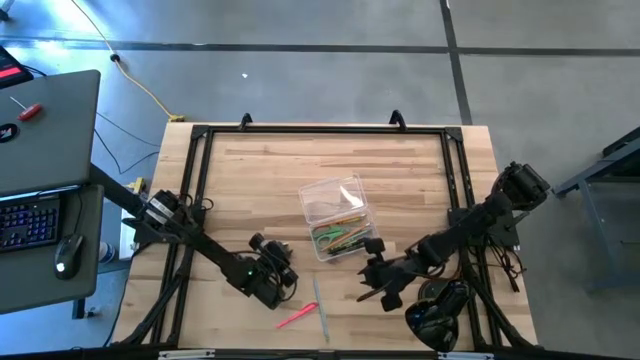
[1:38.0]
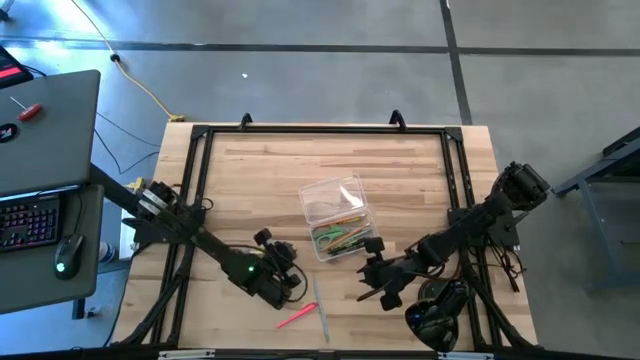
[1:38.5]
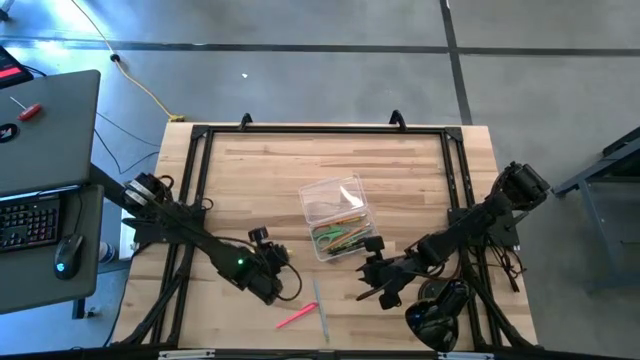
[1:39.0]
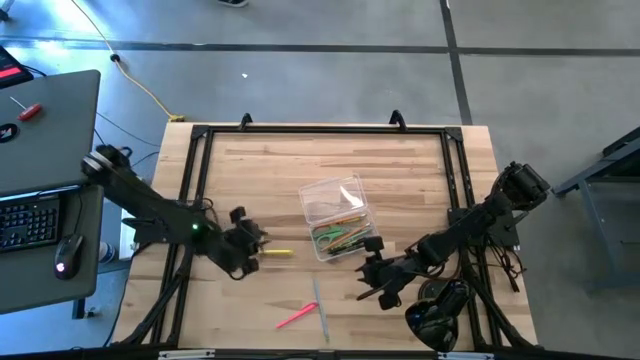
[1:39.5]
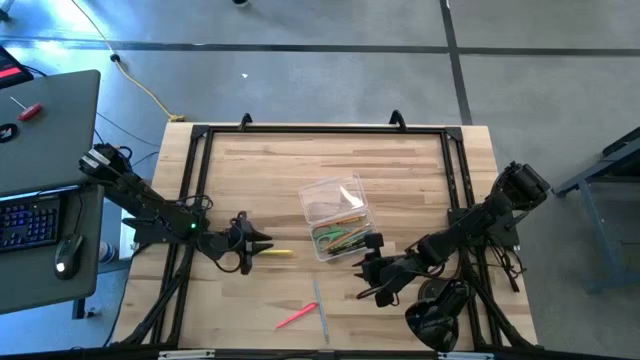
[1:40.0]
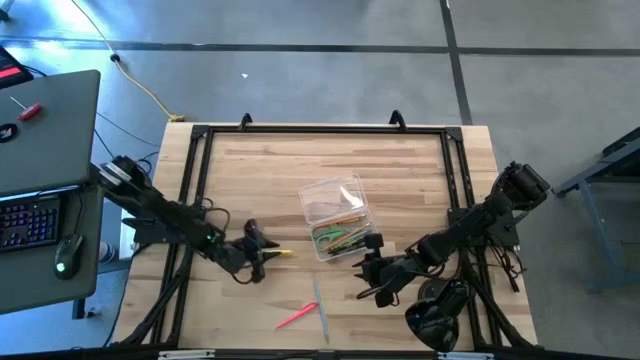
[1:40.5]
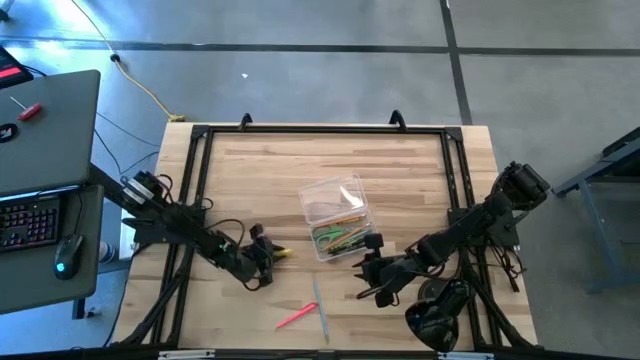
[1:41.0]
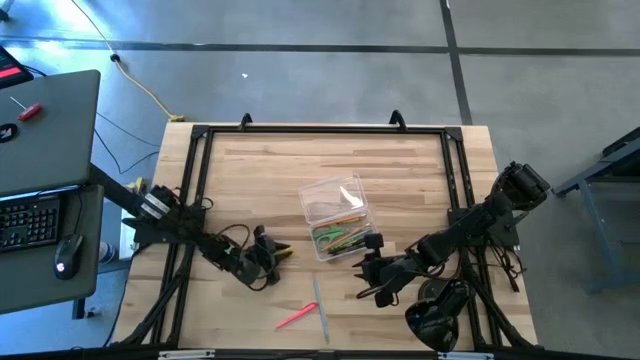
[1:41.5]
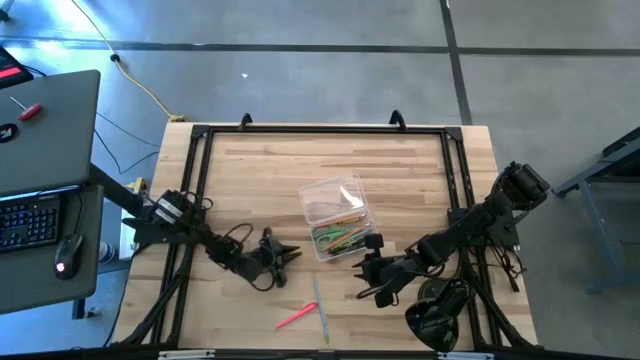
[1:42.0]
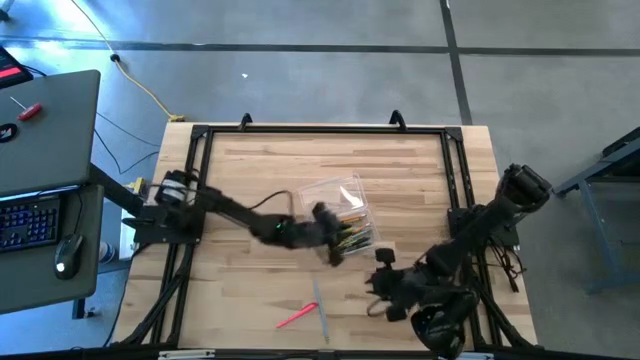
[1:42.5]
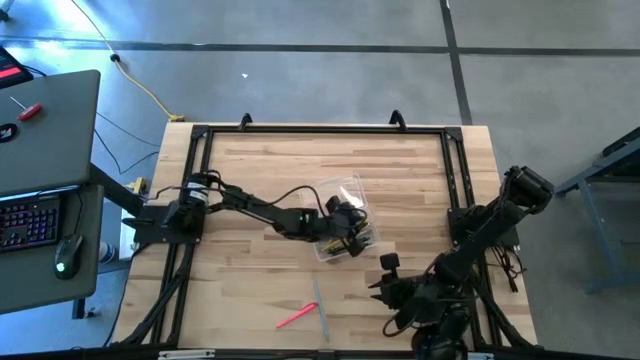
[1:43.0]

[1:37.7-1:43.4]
Task: Pick & place school supplies into a supply box
Put the yellow pen into the supply box

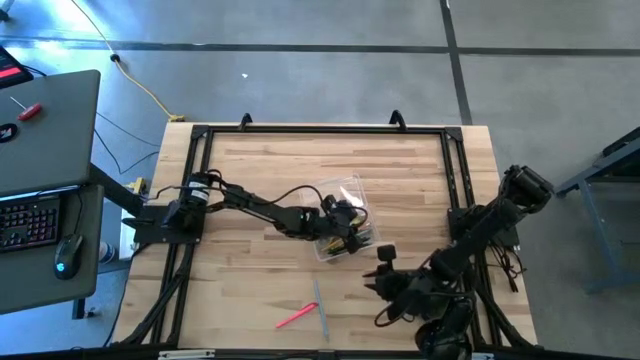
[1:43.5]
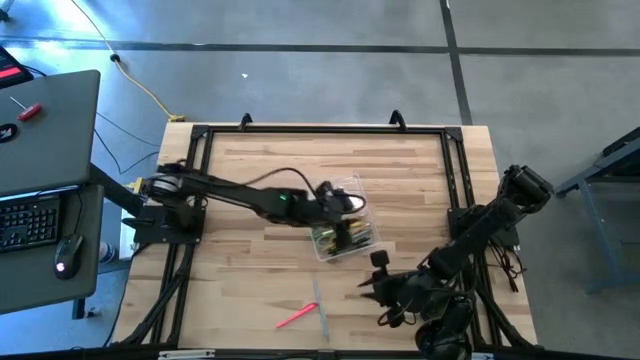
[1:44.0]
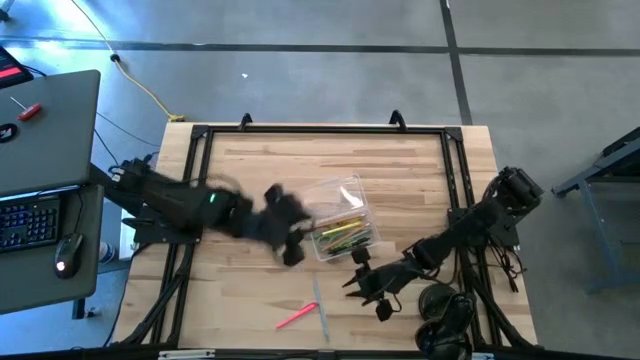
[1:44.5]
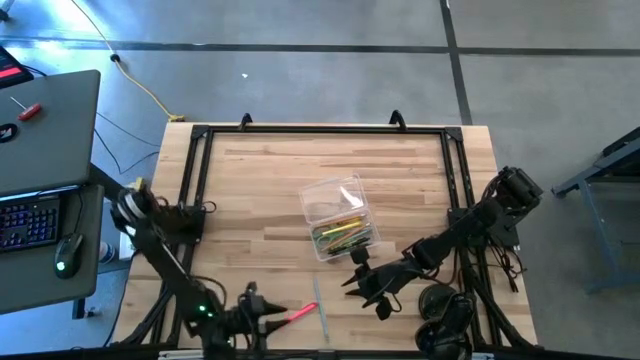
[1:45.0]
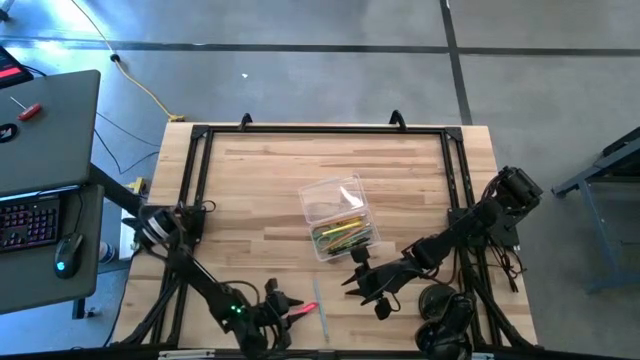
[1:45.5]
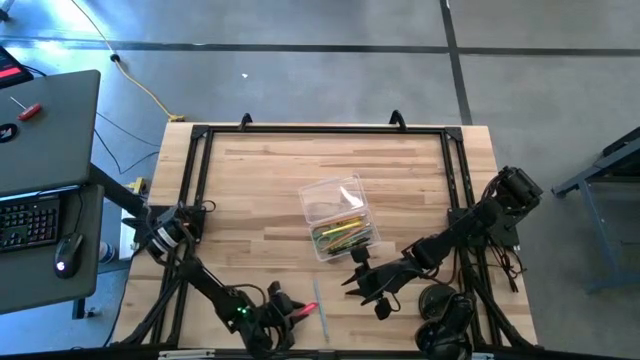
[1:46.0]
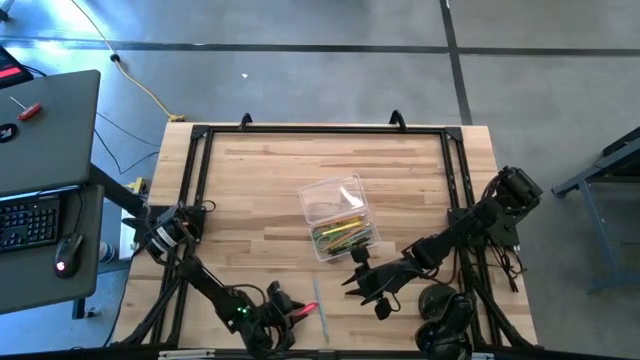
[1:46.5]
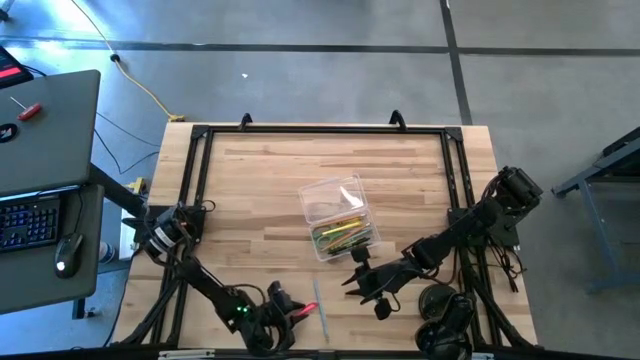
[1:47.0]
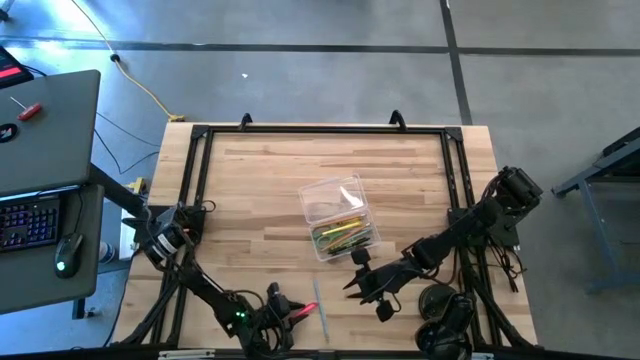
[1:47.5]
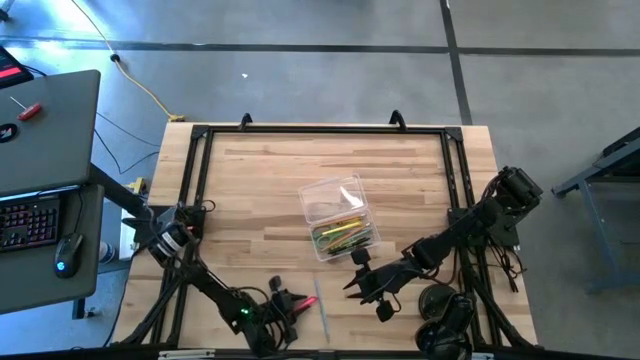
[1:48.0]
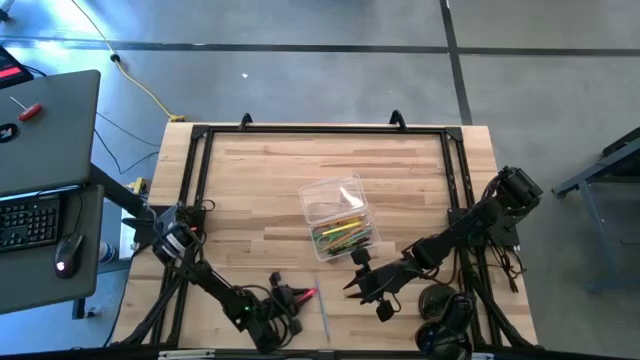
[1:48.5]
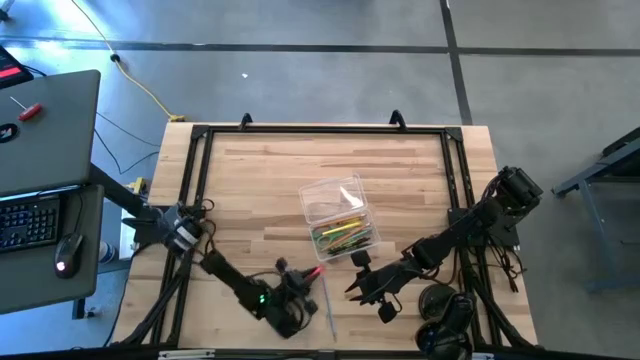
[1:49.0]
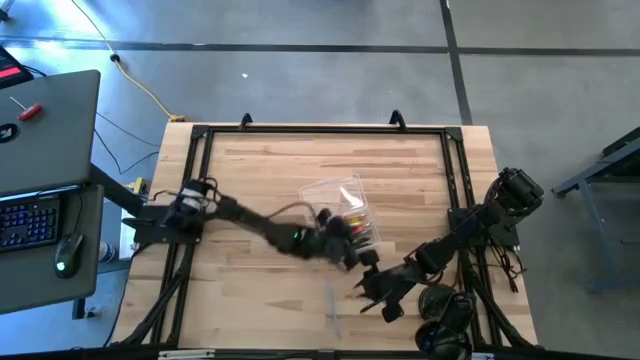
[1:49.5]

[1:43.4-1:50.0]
Put the pink pen into the supply box

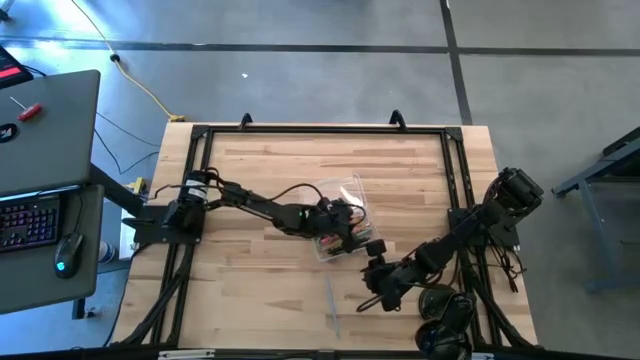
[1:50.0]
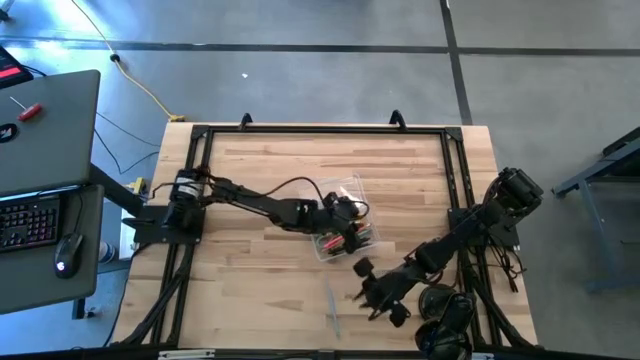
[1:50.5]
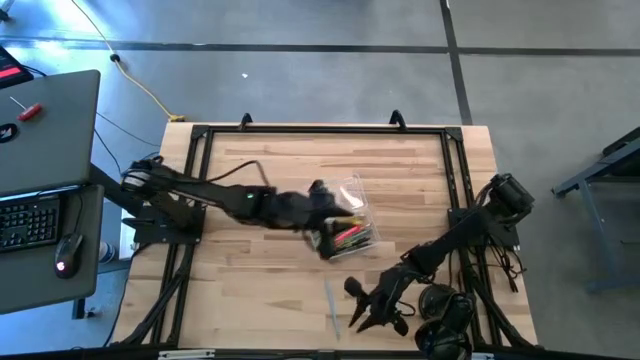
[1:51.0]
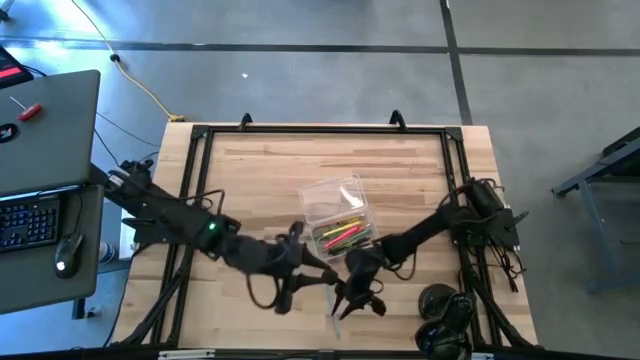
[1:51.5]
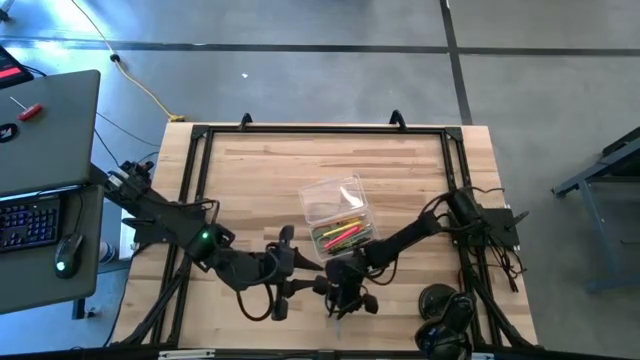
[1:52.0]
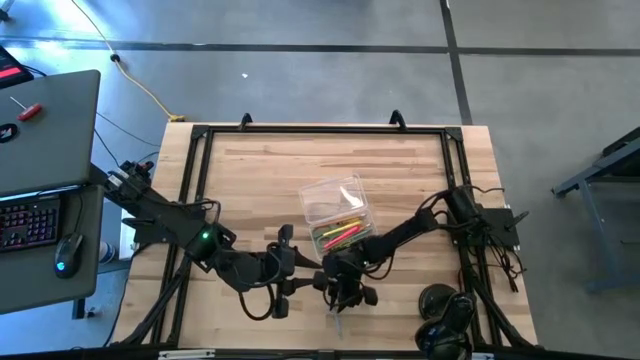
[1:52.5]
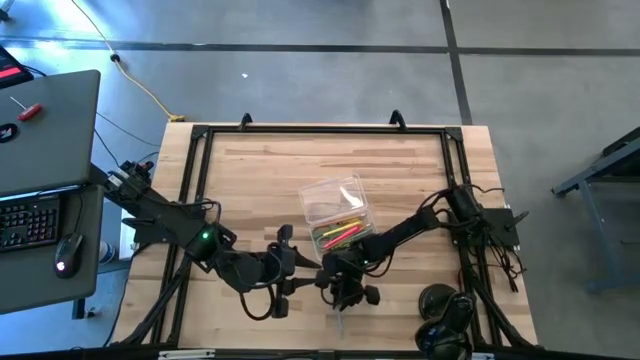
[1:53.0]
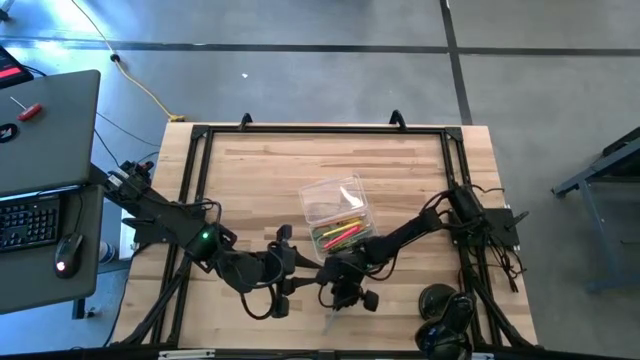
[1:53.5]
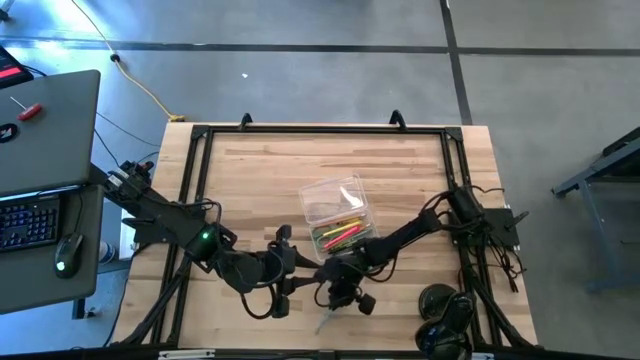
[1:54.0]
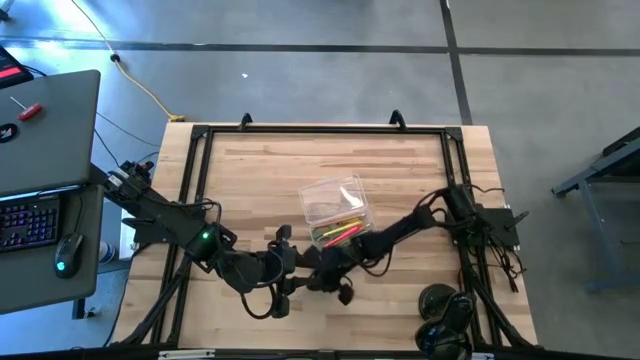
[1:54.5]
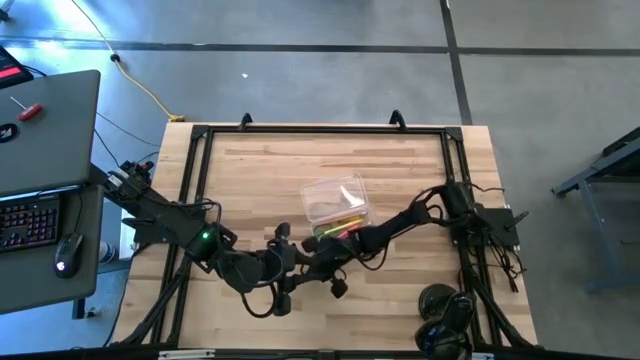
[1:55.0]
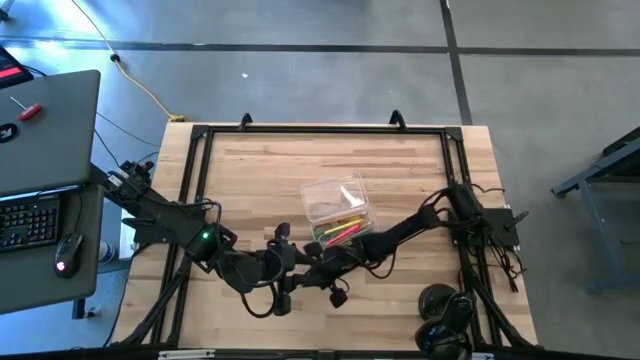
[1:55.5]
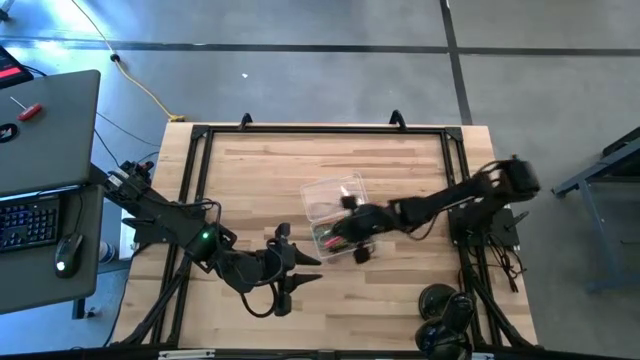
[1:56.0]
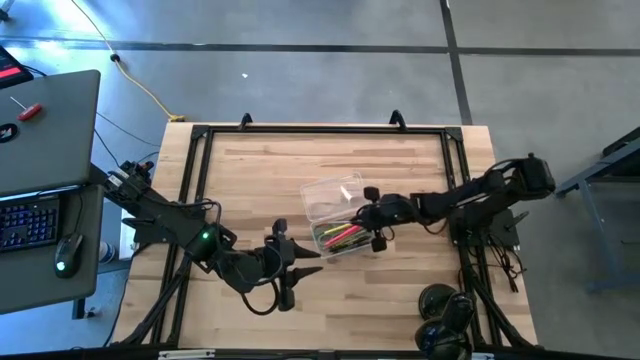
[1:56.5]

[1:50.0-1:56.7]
Put the blue pencil into the supply box
